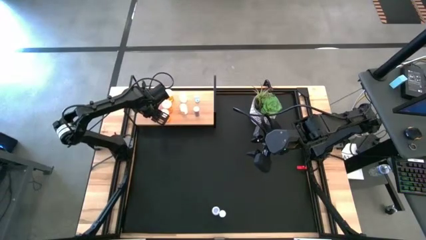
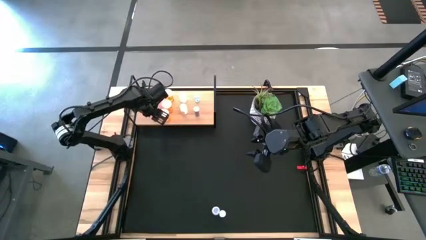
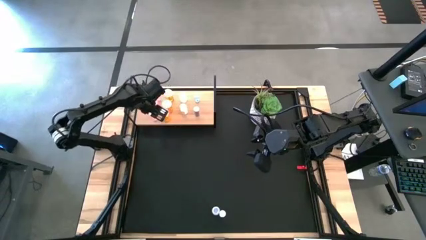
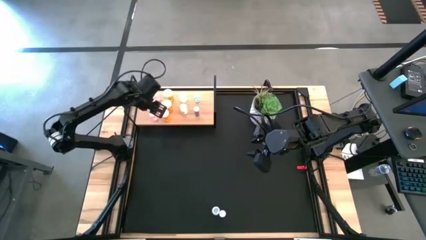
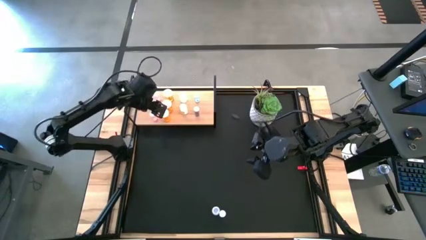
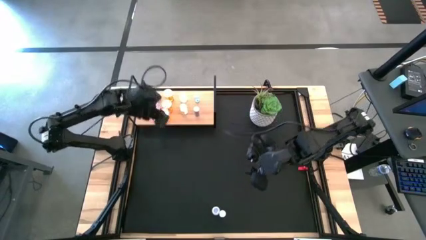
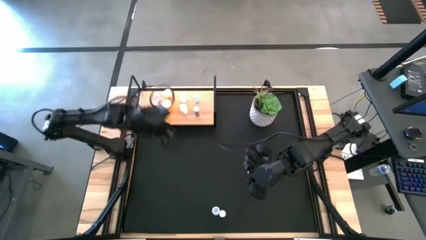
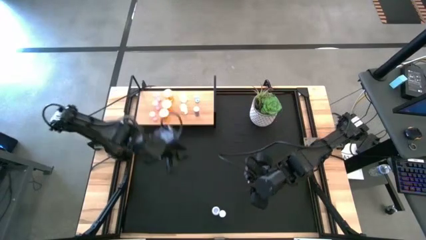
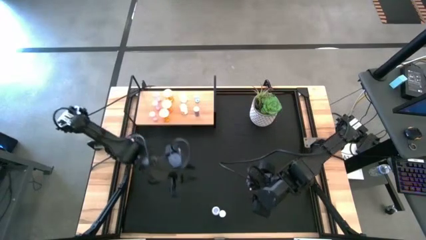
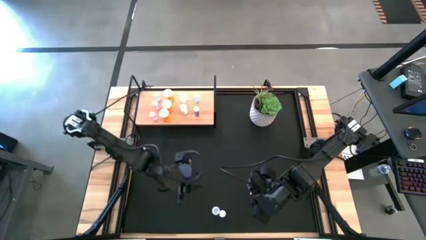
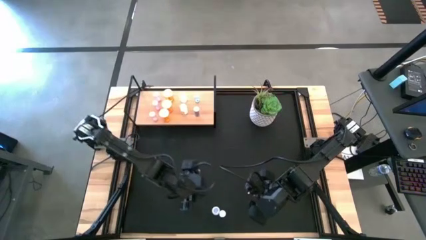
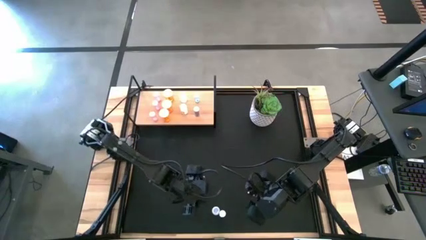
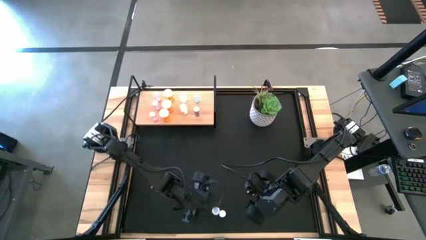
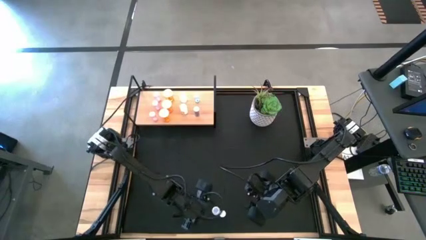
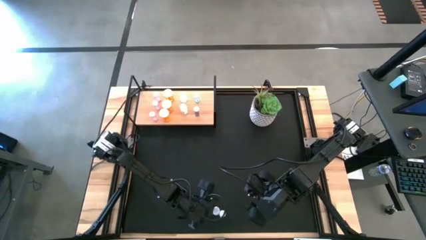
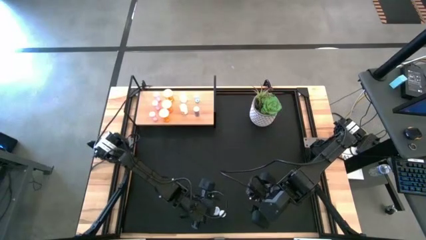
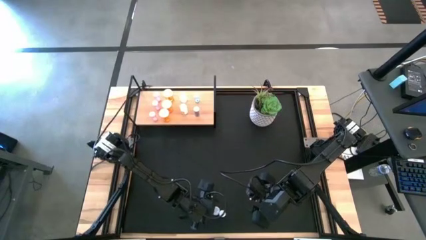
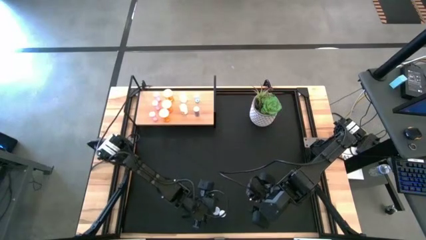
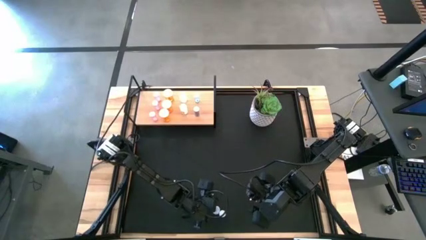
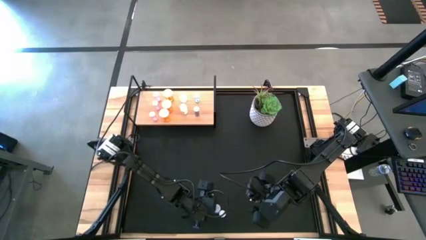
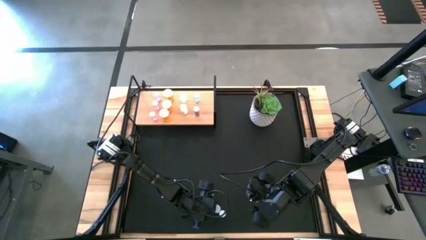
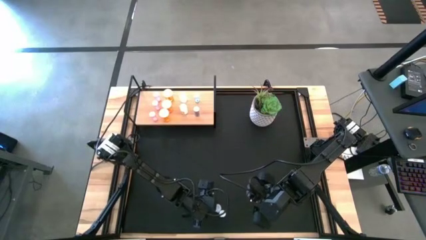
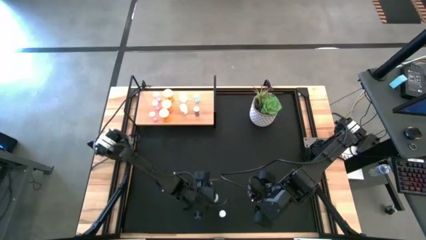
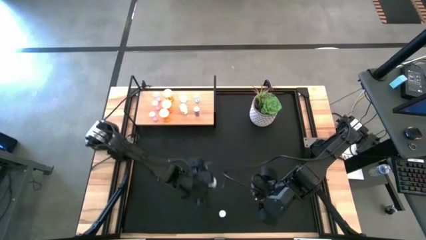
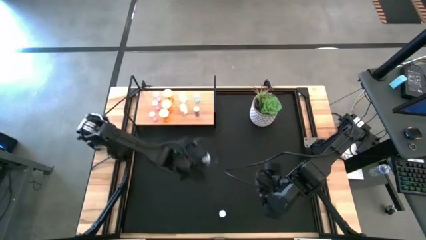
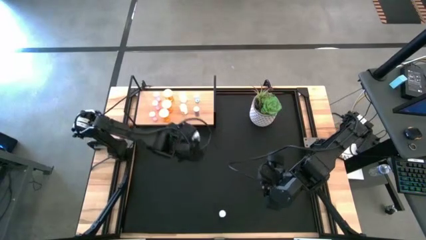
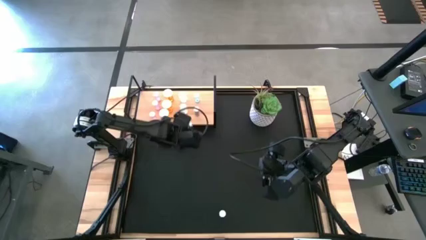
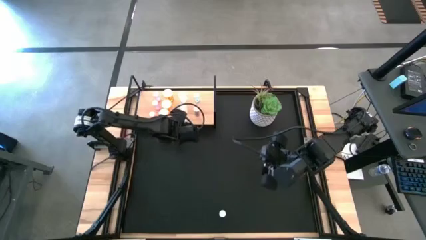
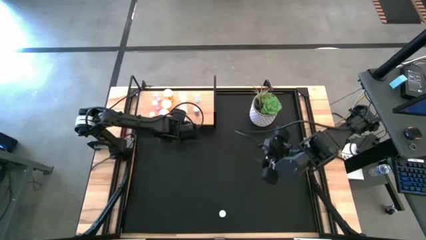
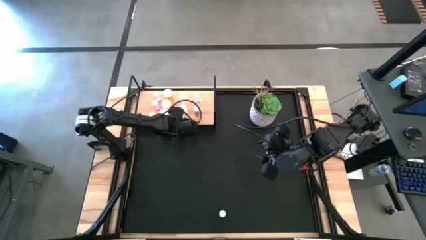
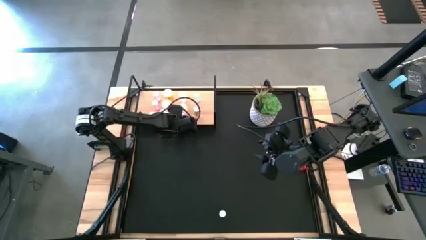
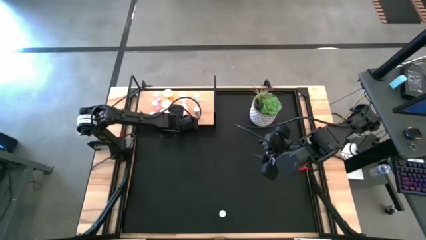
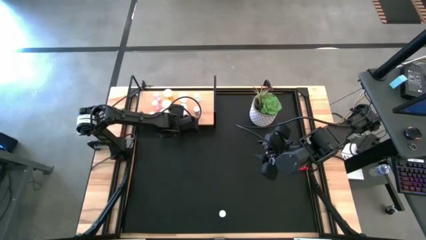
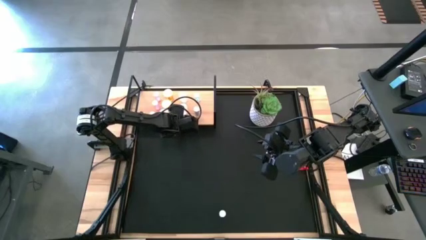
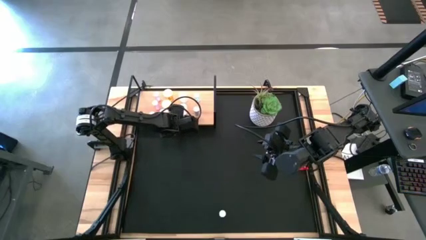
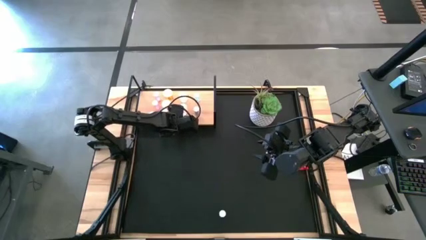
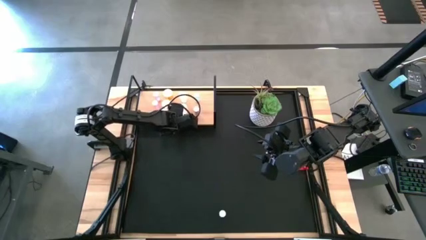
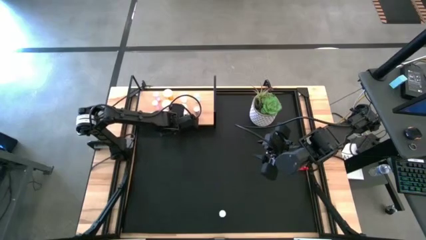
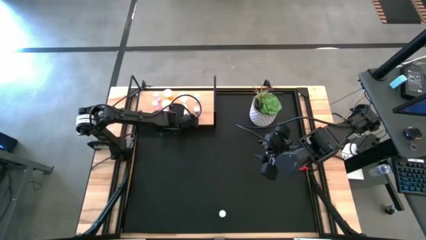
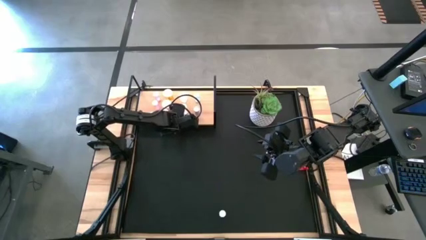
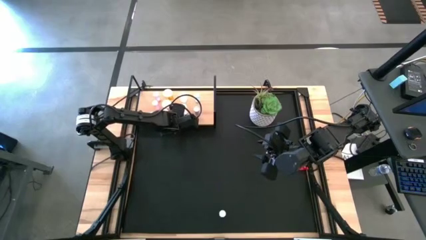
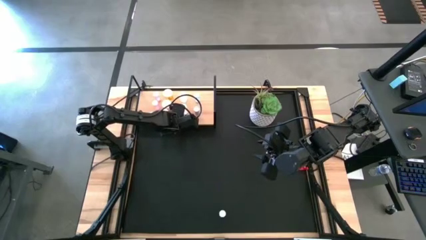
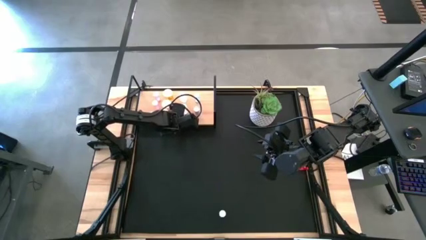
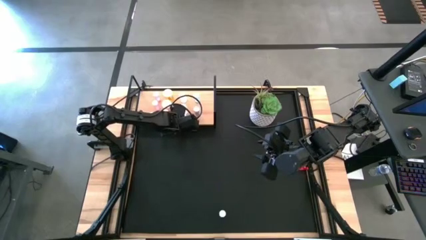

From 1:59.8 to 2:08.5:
Task: Pick and place medicine bottles onto shelf by color
Put the white pill bottle on the shelf aligned with the other white pill bottle

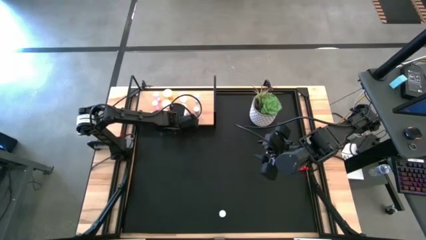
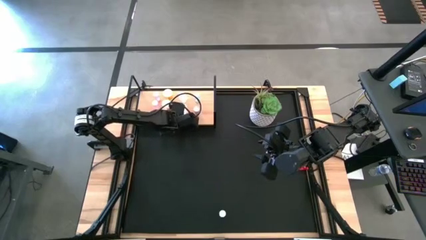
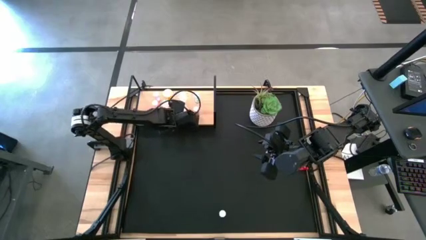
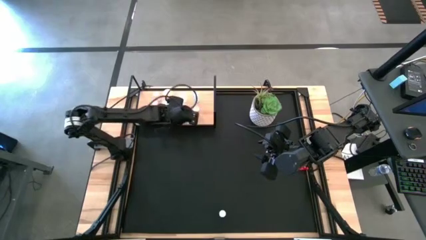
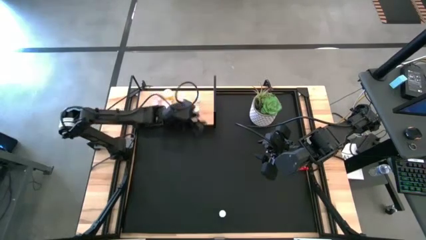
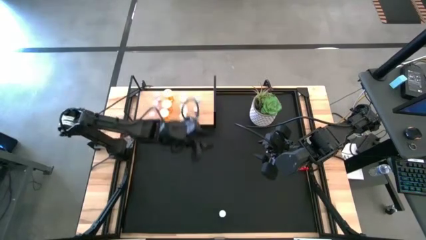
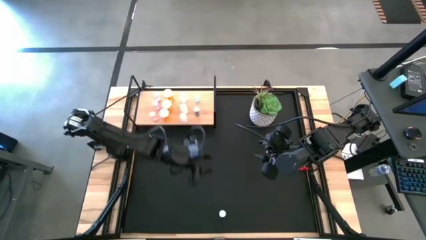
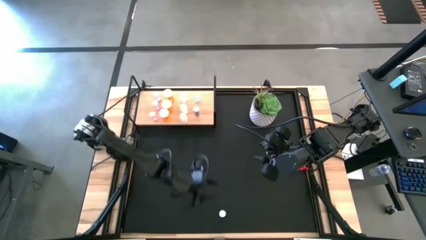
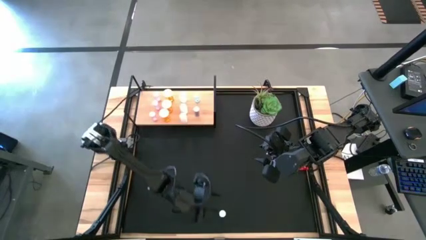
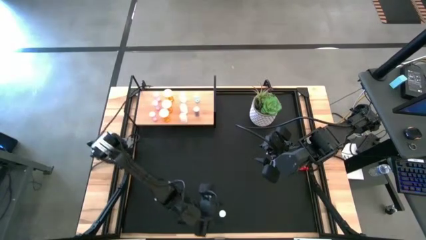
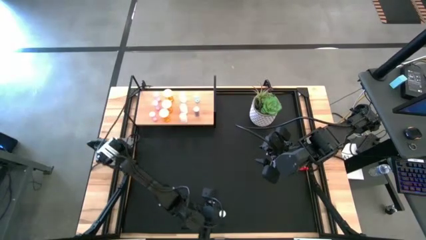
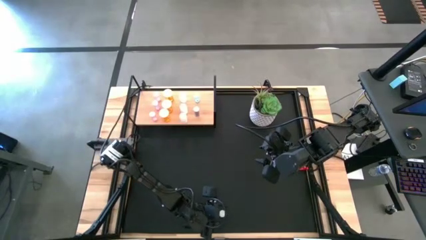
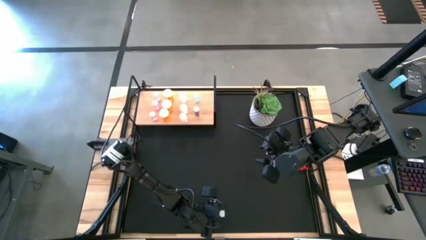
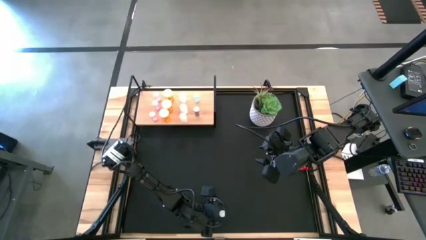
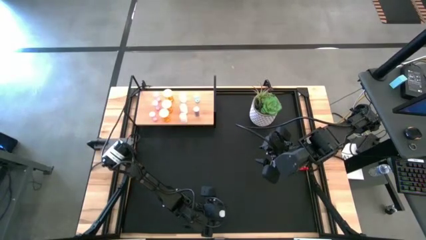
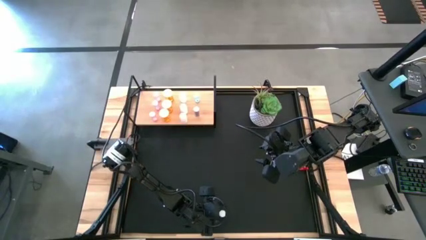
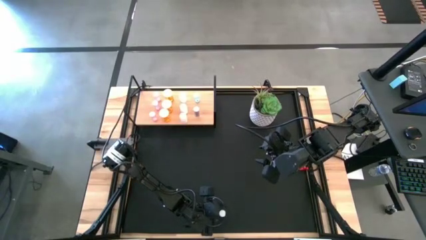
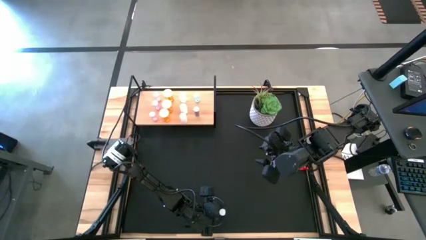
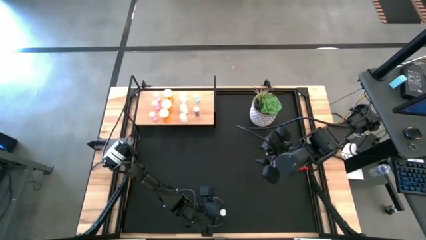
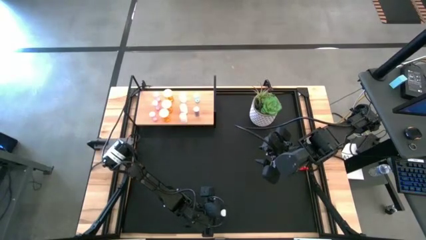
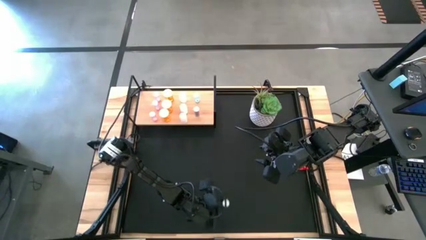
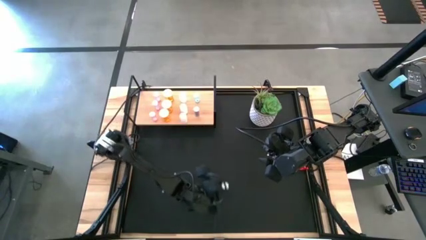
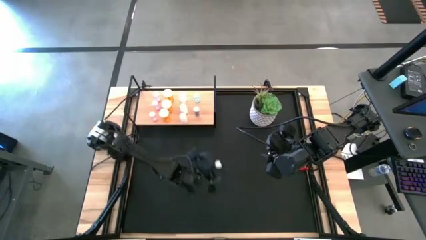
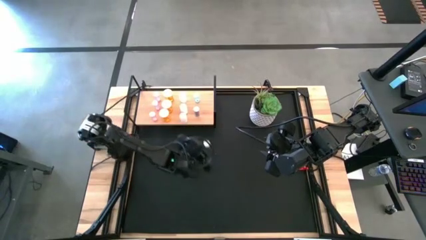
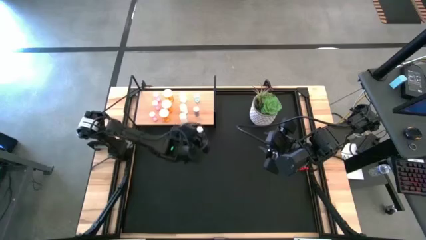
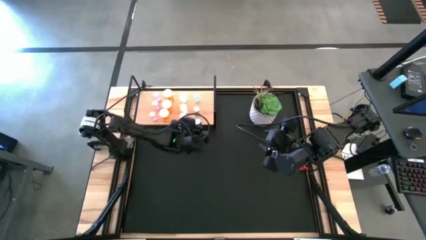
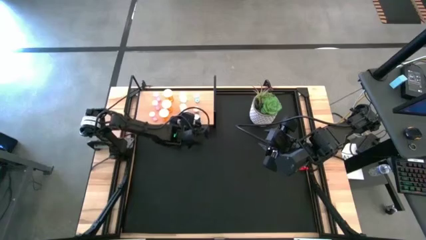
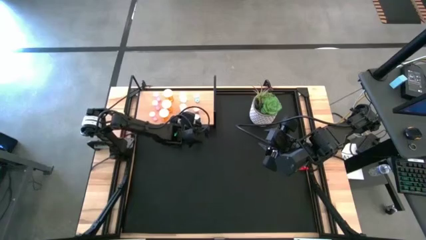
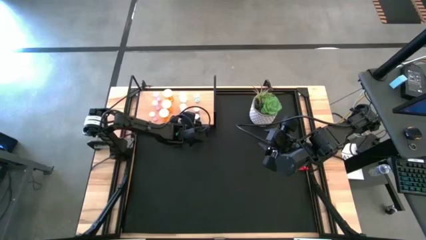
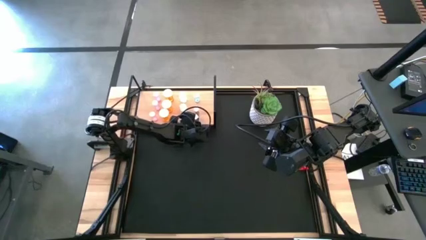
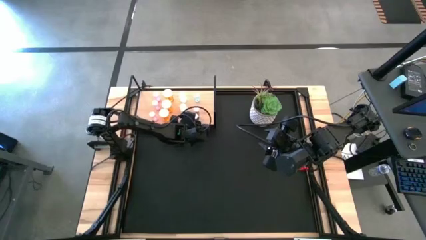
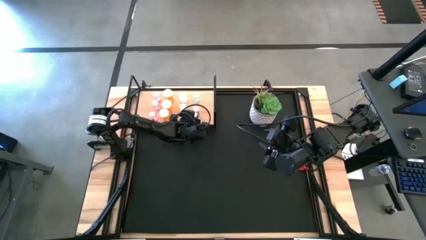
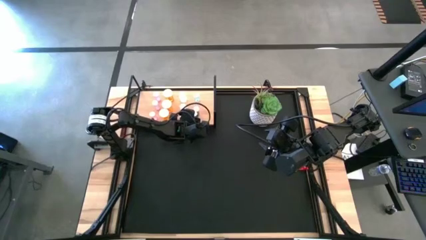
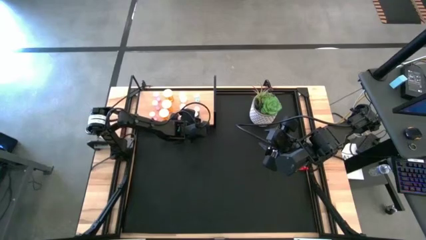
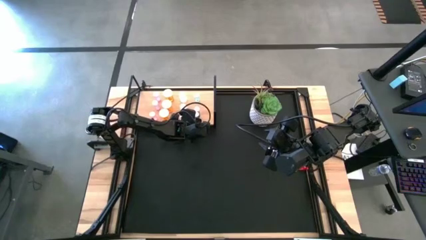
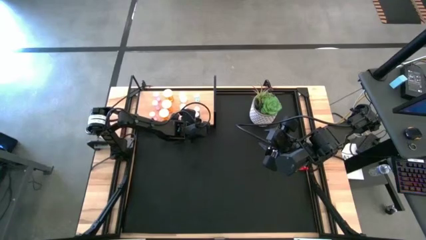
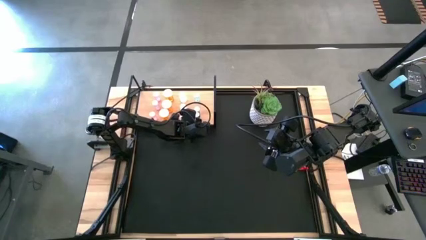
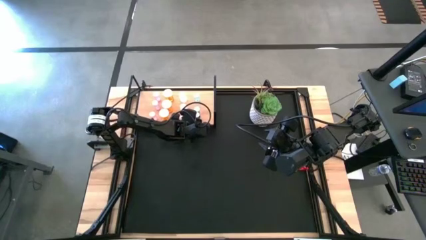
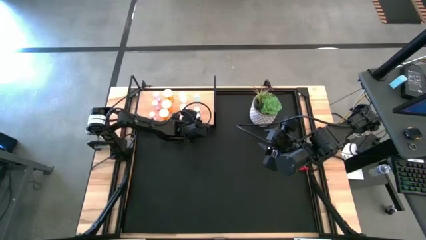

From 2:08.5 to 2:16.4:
Put the blue pill bottle on the shelf aligned with the other blue pill bottle
